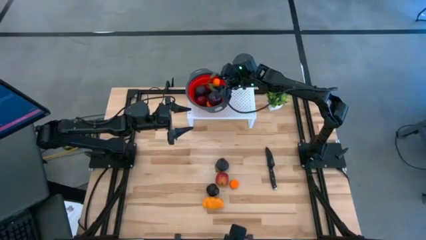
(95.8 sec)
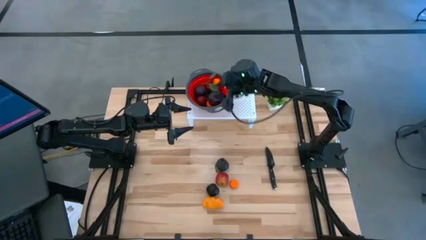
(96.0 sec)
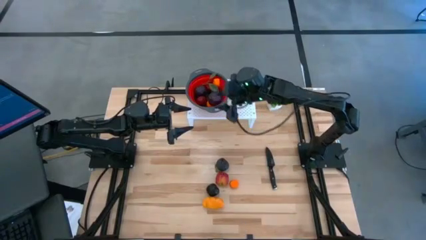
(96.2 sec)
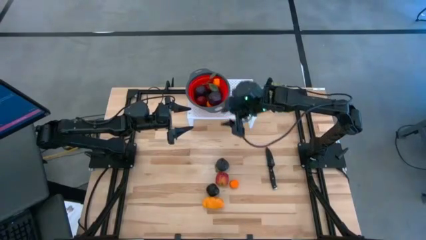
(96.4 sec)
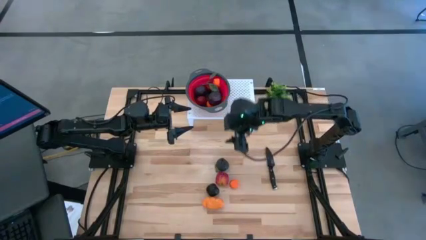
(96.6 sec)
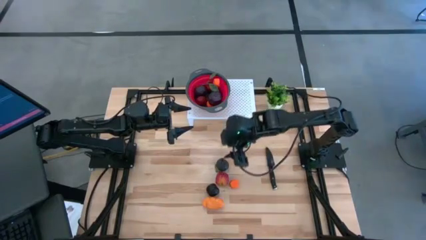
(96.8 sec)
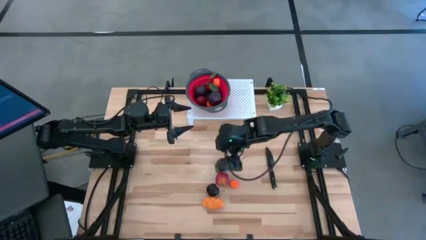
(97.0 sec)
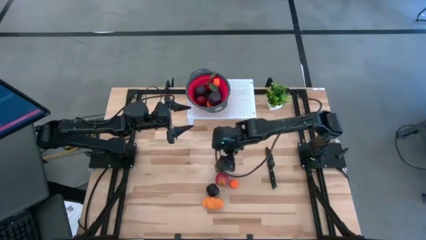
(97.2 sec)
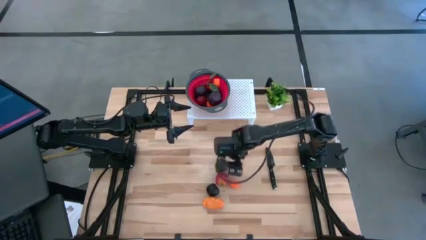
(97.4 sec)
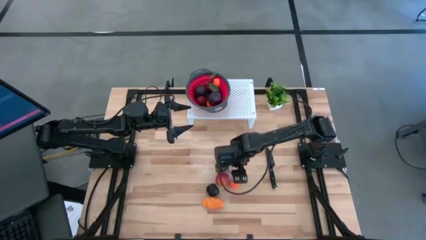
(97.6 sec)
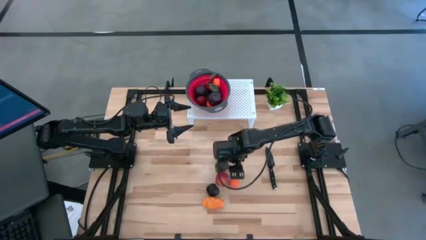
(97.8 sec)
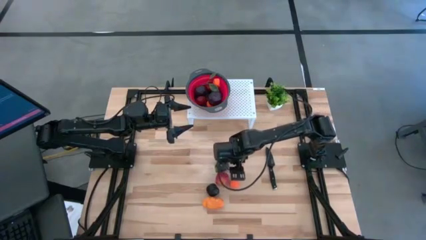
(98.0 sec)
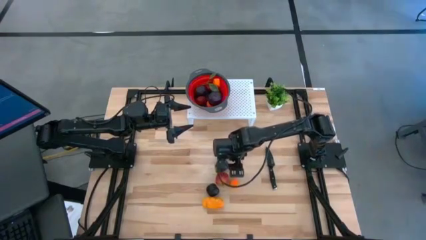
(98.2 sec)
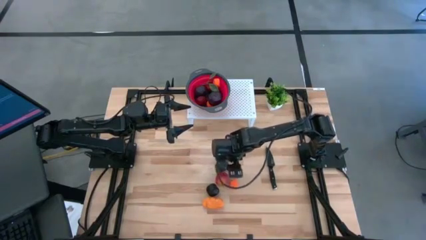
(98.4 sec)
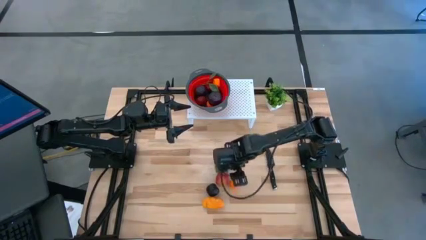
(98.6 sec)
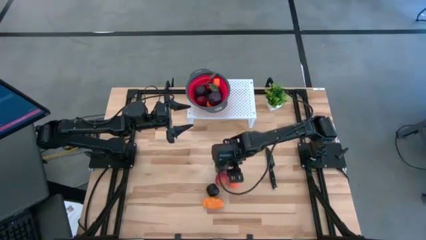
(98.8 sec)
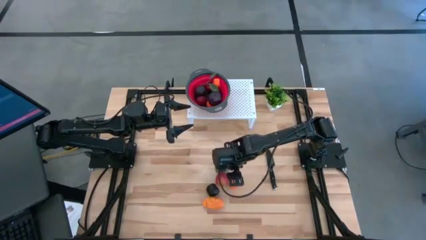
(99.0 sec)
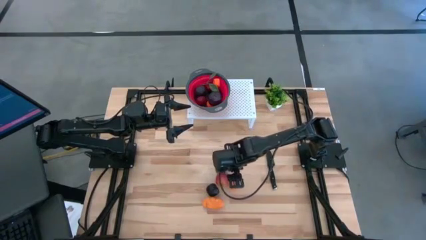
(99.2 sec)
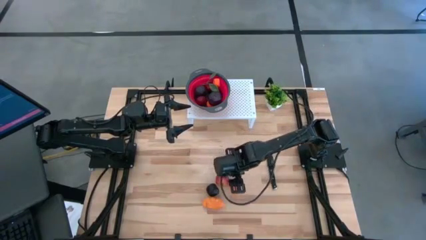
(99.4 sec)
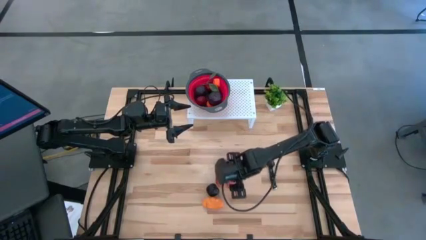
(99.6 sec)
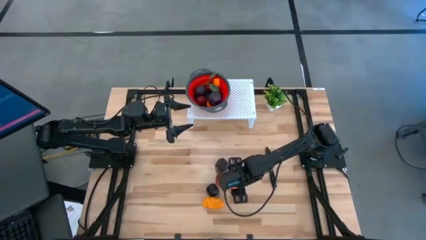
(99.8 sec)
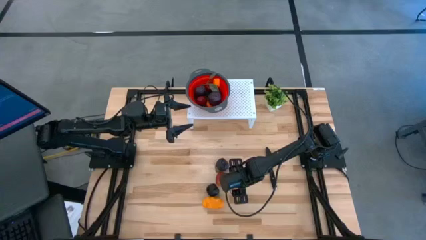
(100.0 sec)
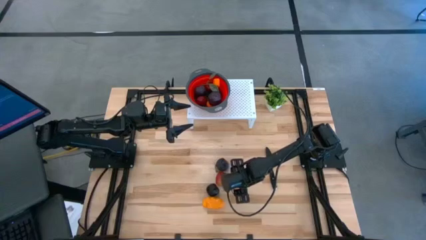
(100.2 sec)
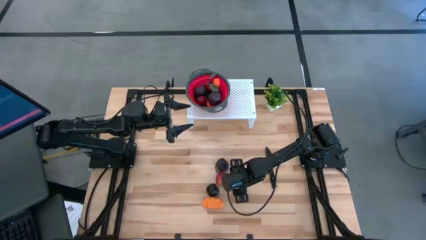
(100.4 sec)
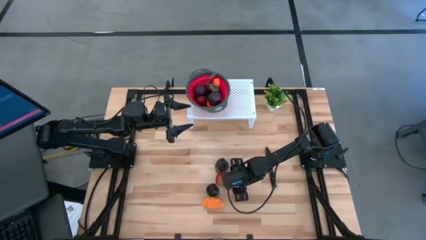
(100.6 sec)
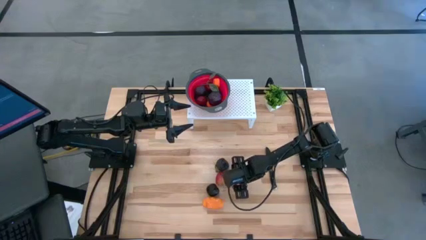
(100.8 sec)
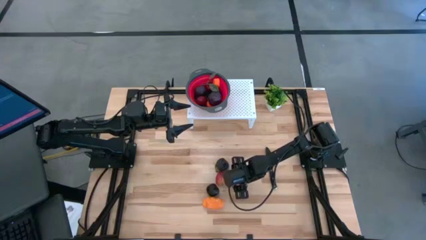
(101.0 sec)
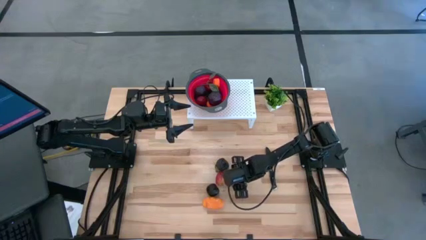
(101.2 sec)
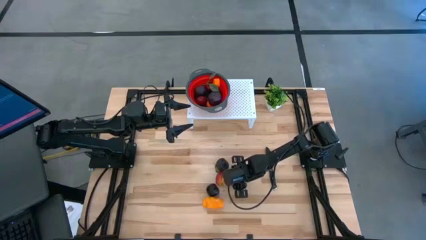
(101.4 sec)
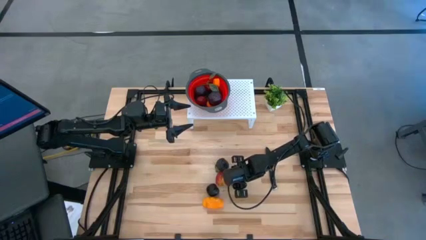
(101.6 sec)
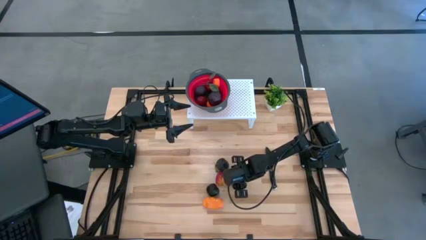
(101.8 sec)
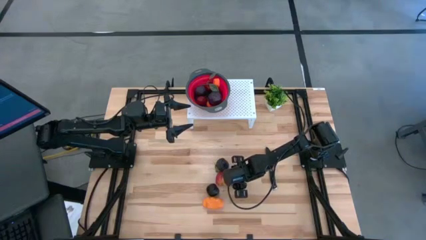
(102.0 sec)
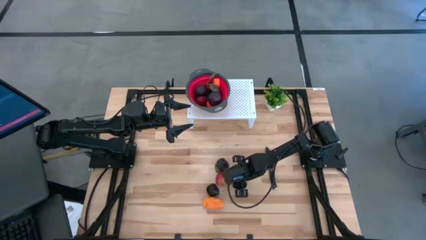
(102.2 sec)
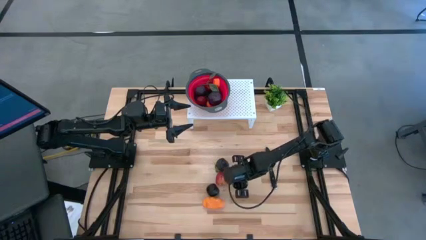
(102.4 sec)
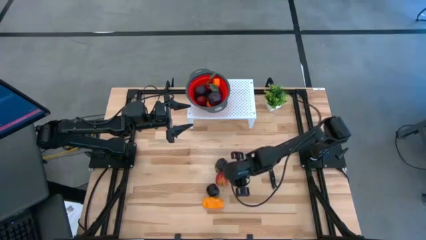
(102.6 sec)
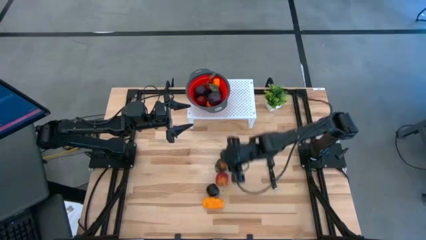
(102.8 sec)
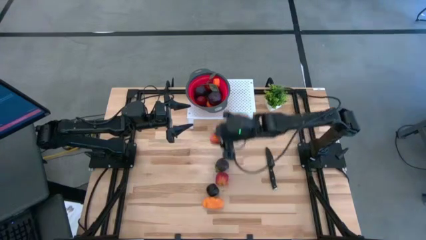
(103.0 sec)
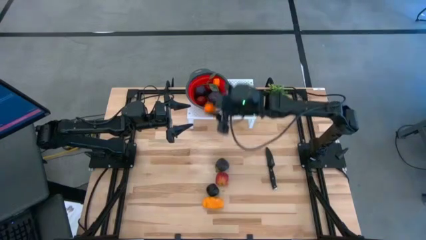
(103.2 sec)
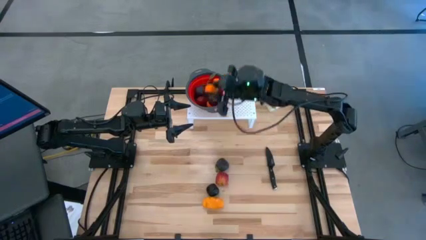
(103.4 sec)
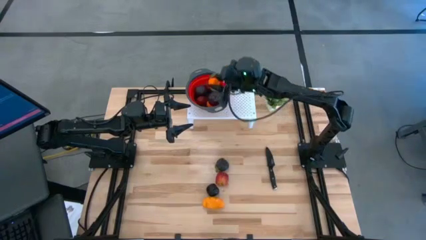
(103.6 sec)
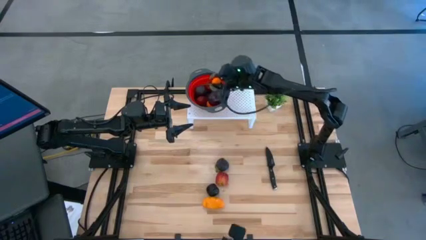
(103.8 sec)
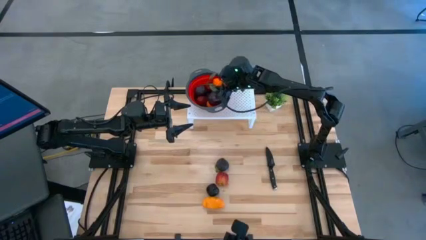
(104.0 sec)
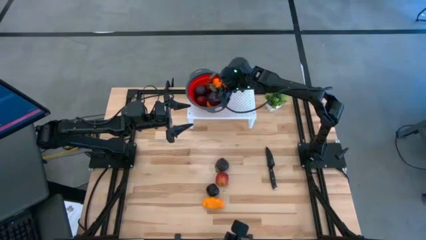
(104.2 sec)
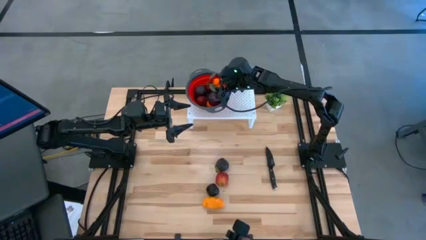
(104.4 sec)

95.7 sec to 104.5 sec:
Task: Pick & Place Fruit
Put the tangerine into the strainer bowl on the shelf

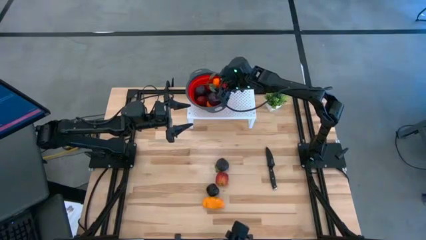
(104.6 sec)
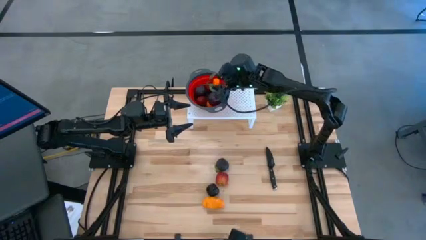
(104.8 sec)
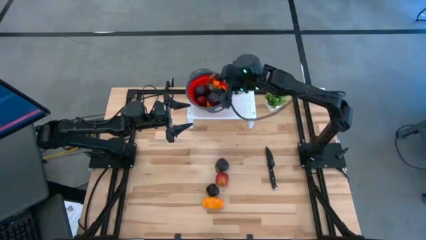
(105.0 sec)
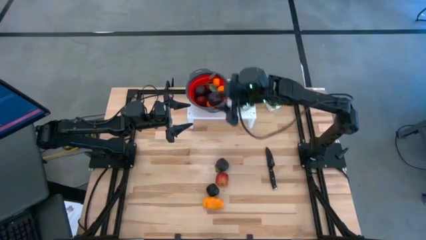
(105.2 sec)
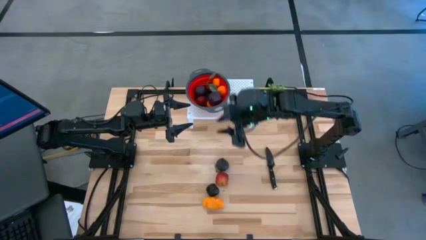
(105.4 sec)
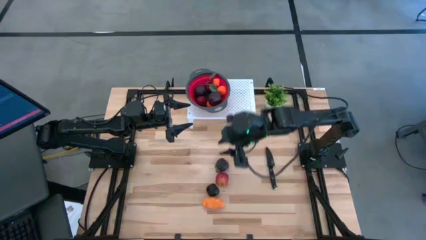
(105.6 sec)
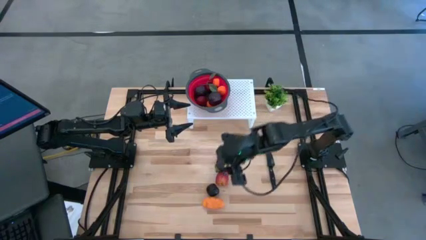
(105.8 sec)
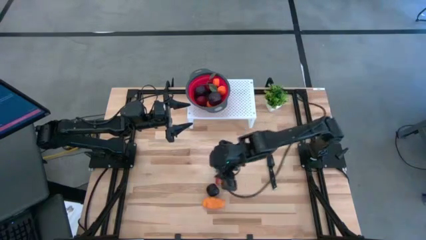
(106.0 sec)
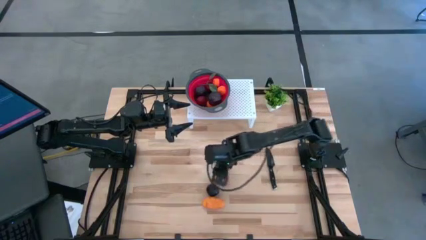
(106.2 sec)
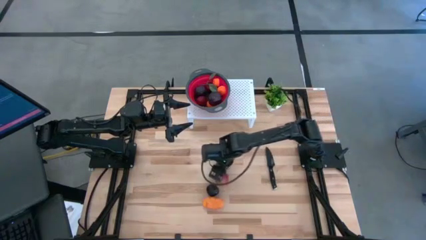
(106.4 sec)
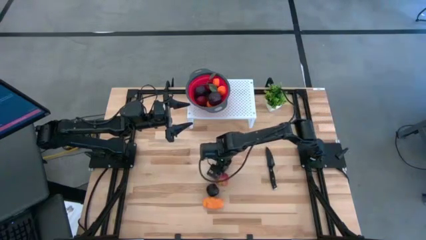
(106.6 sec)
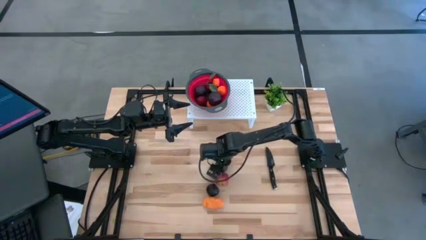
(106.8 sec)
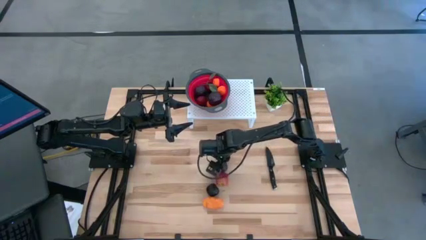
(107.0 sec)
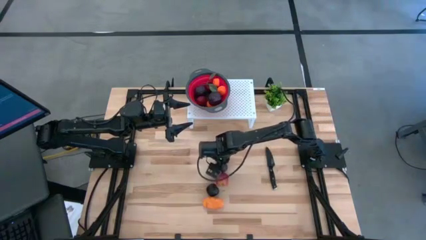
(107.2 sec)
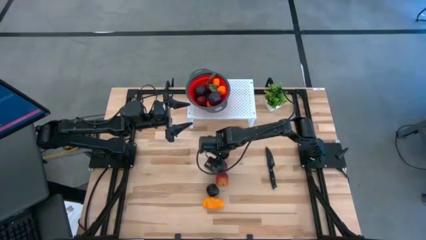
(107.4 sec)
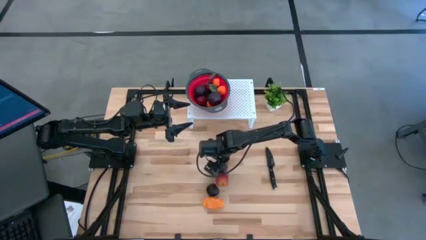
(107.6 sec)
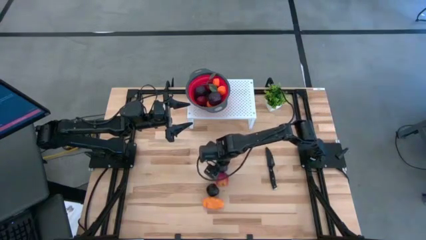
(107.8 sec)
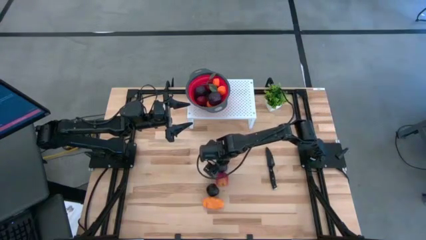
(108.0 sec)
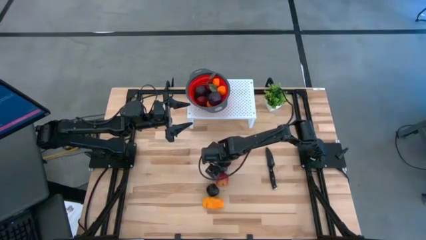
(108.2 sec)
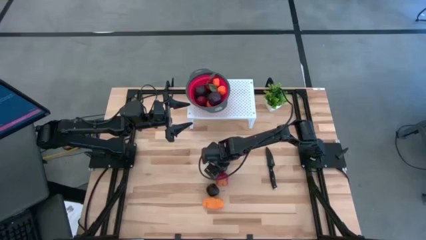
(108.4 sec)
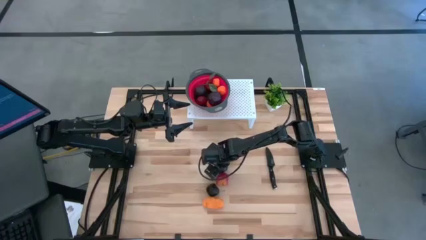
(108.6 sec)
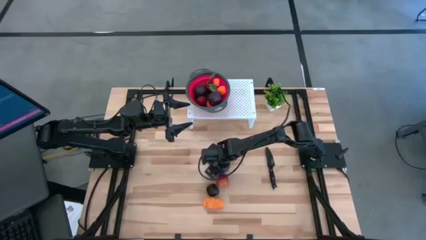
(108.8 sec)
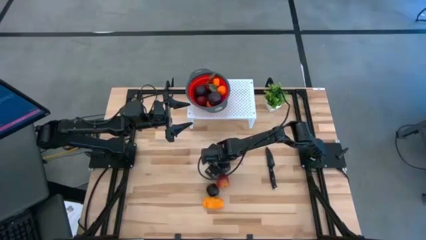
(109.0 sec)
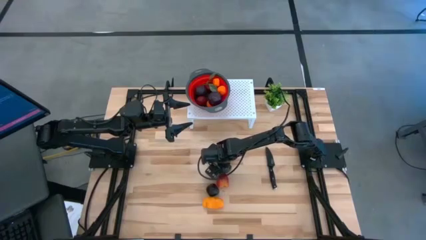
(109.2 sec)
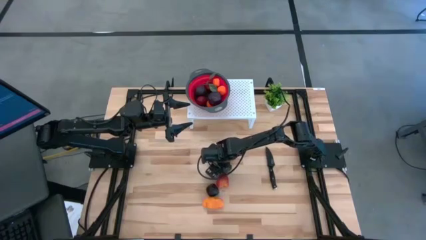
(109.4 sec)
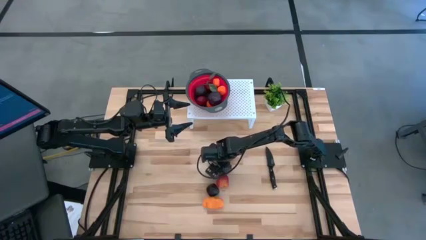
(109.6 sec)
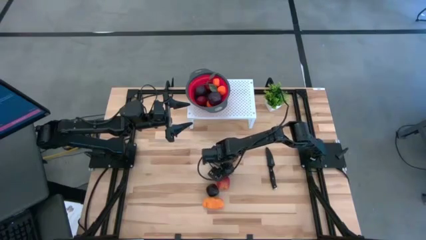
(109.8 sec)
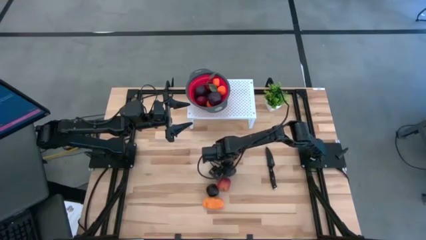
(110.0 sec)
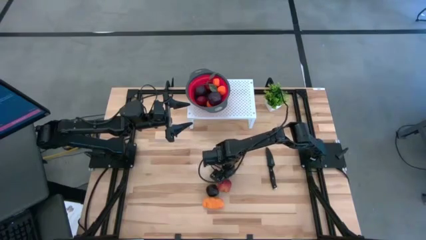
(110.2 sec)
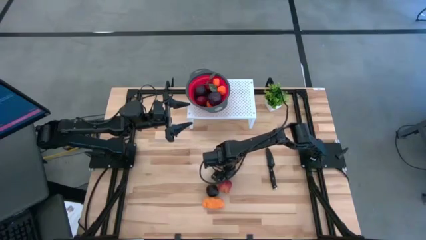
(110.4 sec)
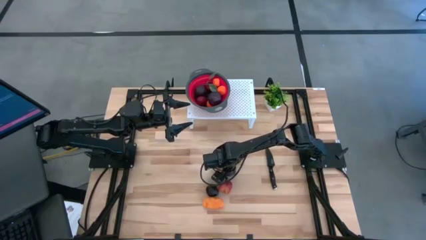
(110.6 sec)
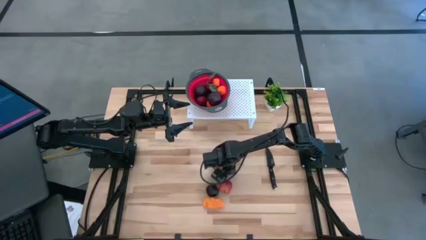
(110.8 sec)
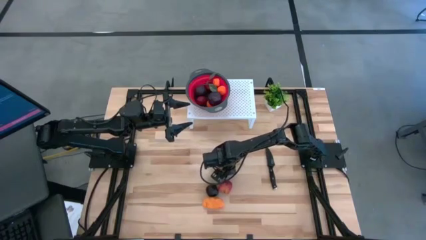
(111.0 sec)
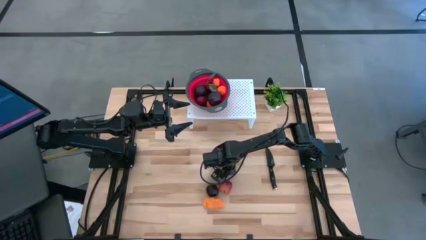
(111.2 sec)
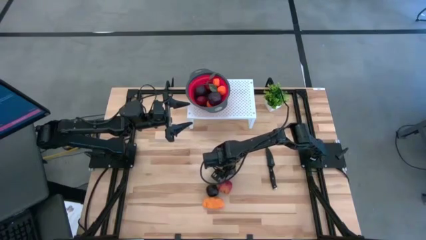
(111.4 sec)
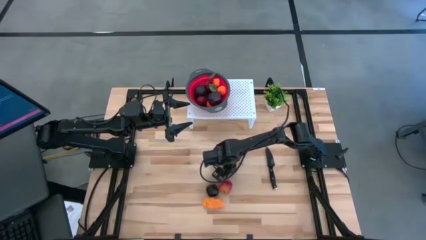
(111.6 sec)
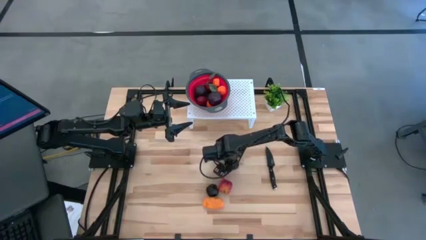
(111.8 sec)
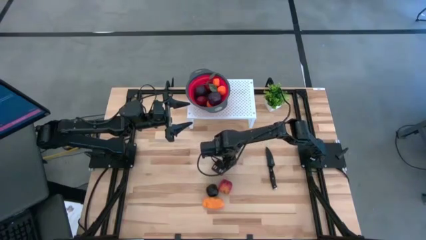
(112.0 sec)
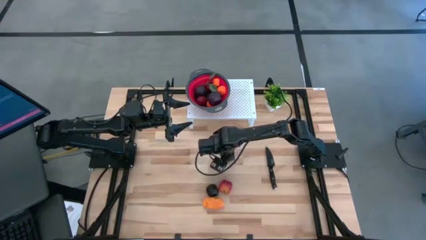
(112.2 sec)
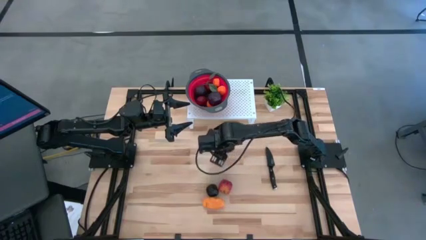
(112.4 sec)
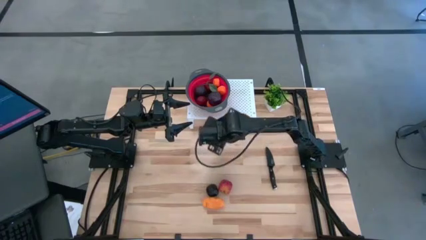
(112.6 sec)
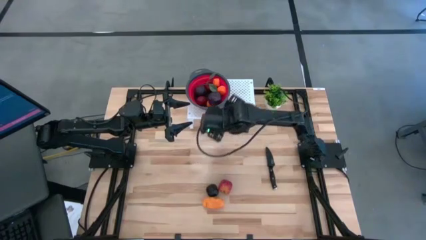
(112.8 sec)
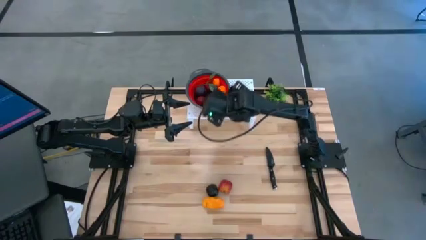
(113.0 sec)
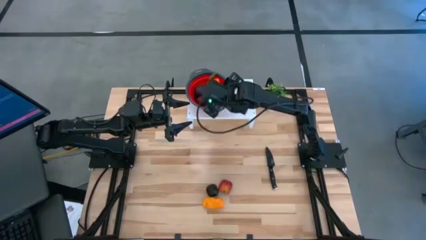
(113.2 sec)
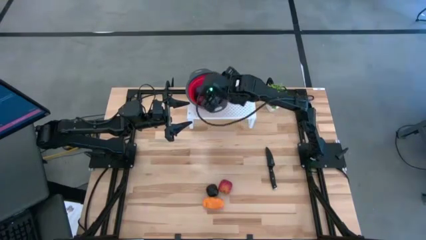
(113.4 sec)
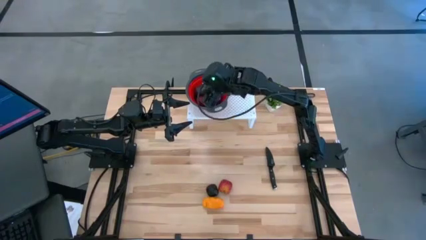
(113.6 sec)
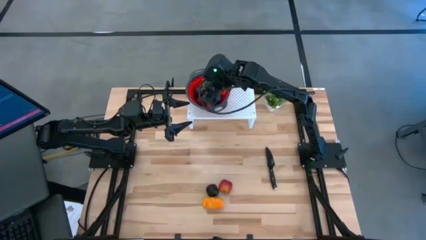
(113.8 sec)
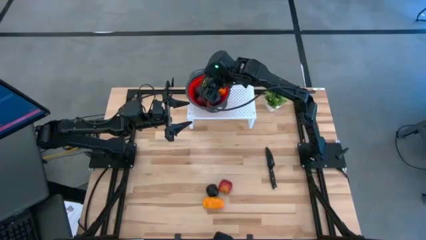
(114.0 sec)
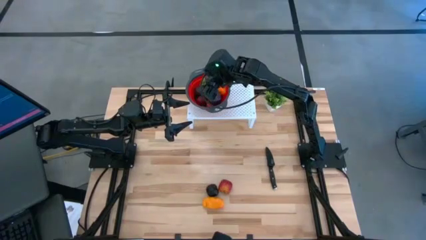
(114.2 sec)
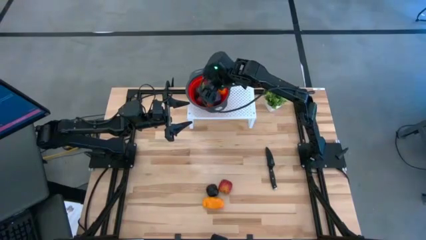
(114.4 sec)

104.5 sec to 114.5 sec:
Put the mangosteen into the strainer bowl on the shelf
